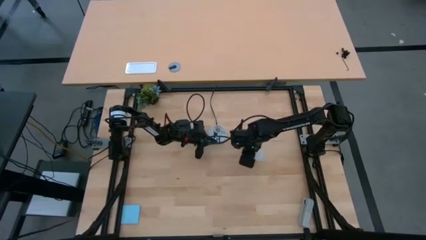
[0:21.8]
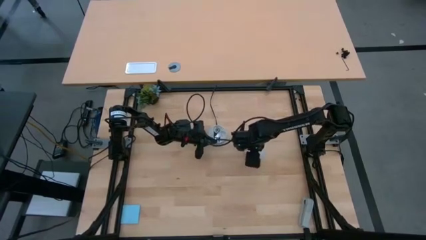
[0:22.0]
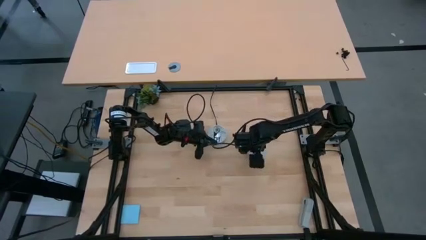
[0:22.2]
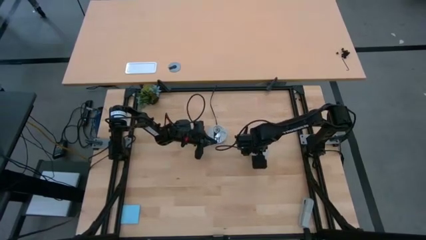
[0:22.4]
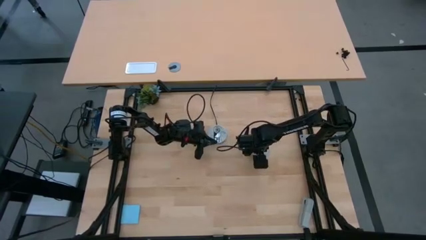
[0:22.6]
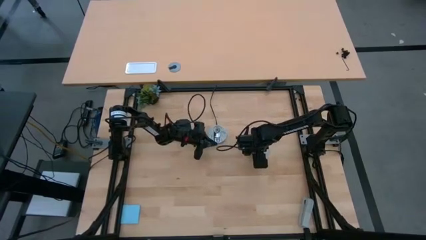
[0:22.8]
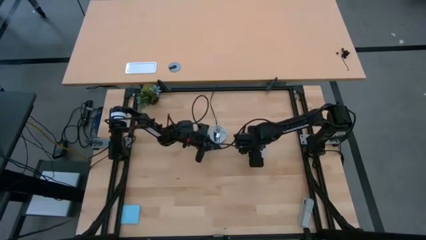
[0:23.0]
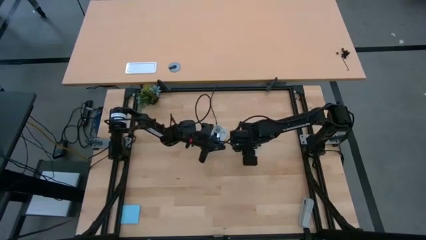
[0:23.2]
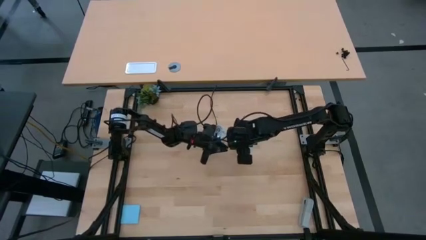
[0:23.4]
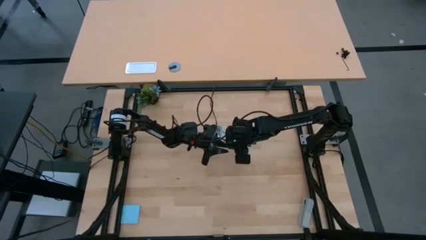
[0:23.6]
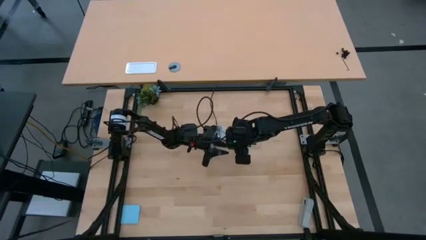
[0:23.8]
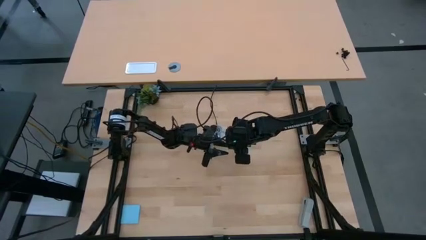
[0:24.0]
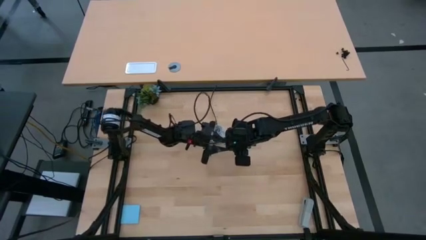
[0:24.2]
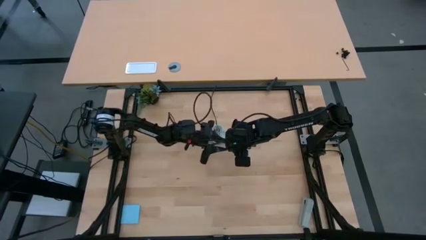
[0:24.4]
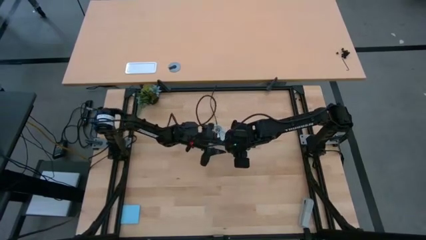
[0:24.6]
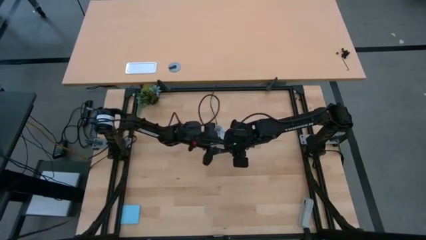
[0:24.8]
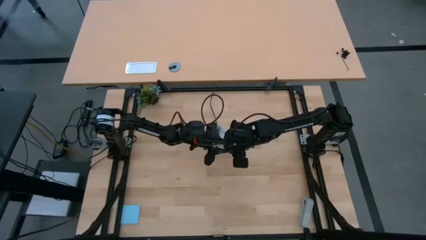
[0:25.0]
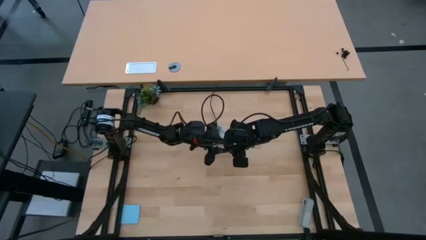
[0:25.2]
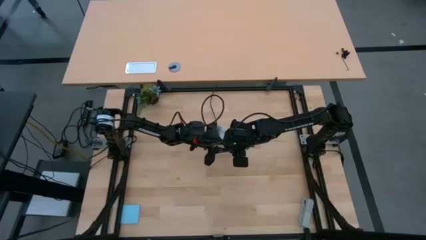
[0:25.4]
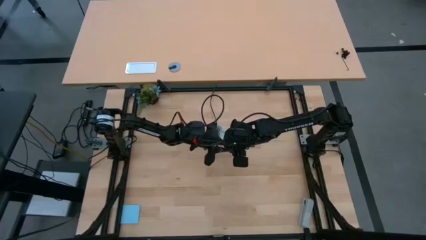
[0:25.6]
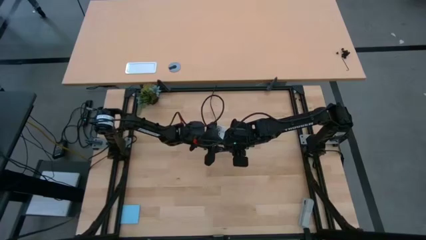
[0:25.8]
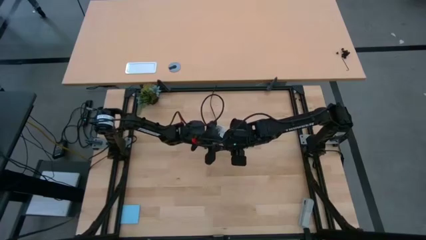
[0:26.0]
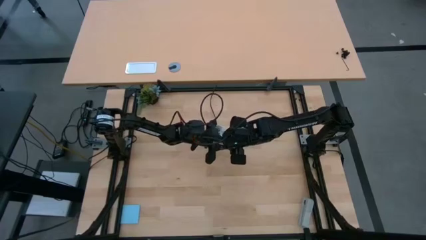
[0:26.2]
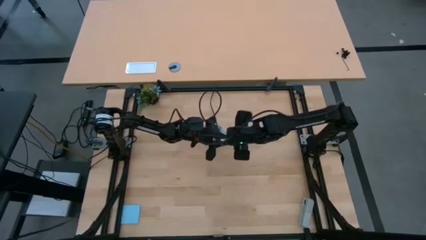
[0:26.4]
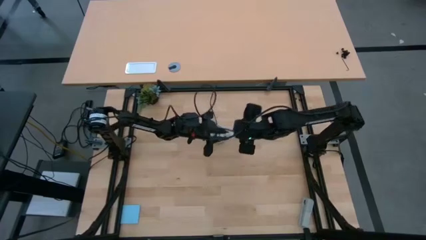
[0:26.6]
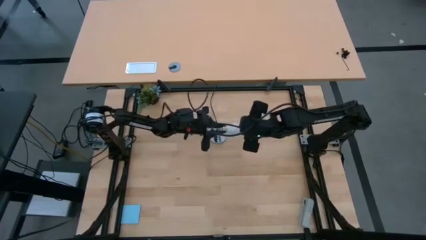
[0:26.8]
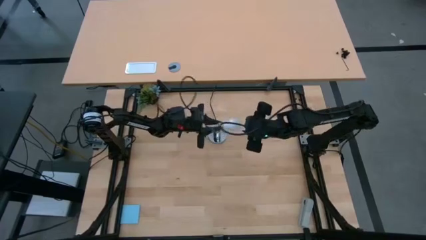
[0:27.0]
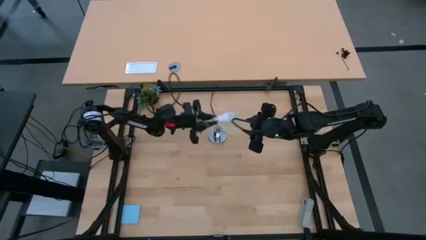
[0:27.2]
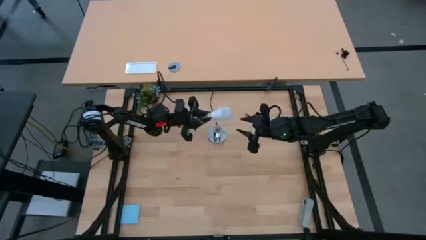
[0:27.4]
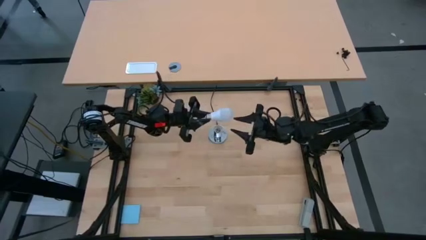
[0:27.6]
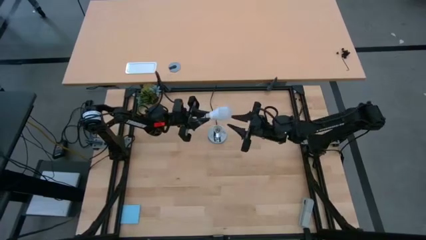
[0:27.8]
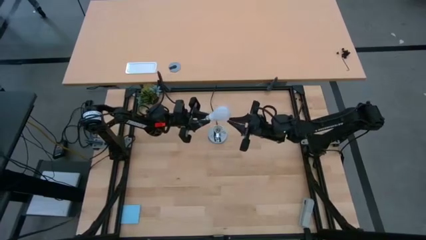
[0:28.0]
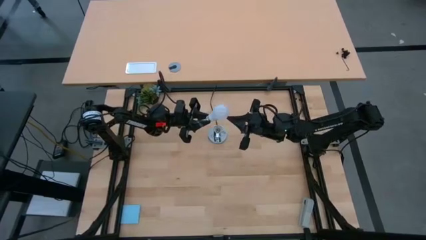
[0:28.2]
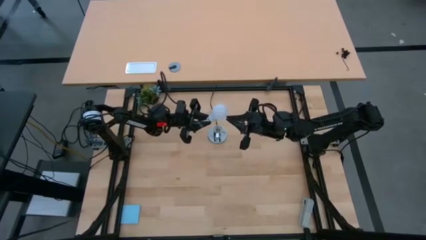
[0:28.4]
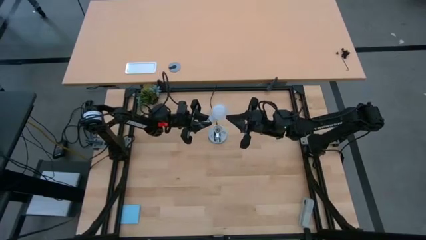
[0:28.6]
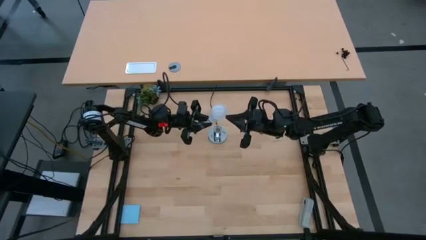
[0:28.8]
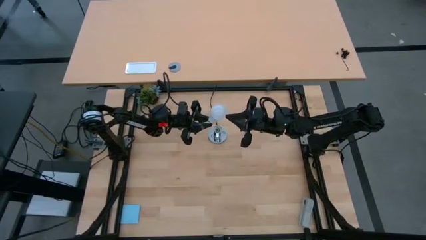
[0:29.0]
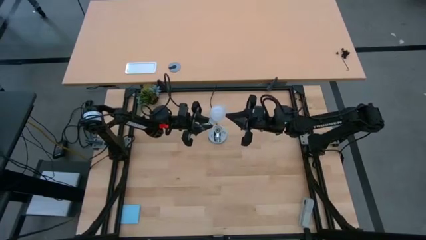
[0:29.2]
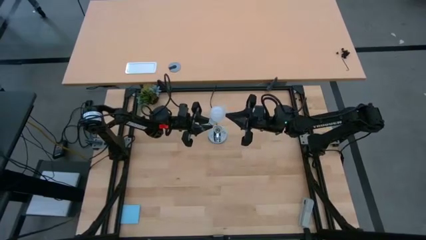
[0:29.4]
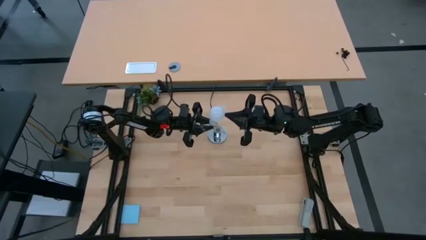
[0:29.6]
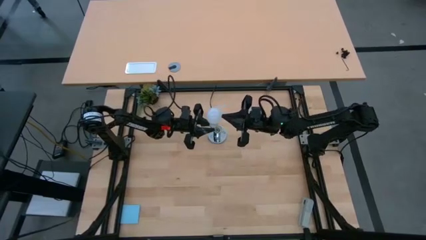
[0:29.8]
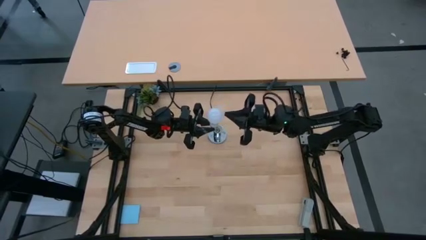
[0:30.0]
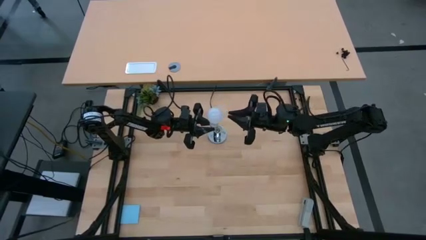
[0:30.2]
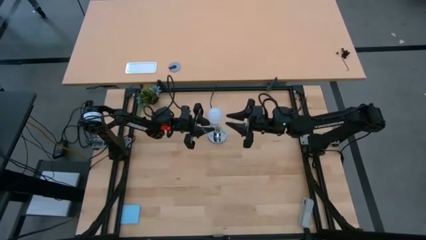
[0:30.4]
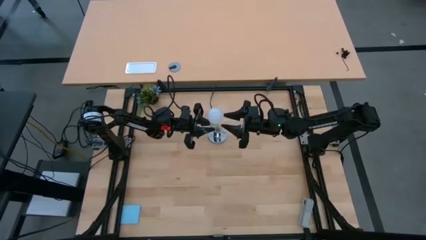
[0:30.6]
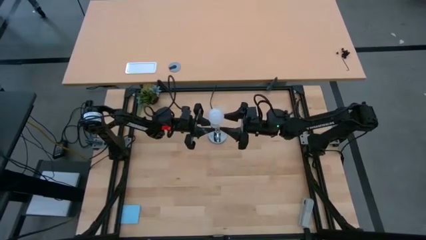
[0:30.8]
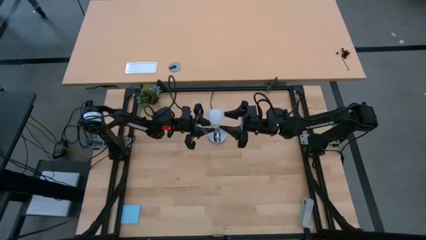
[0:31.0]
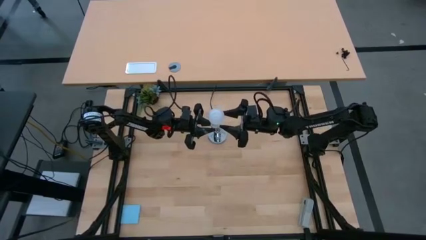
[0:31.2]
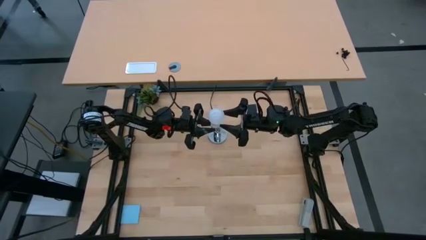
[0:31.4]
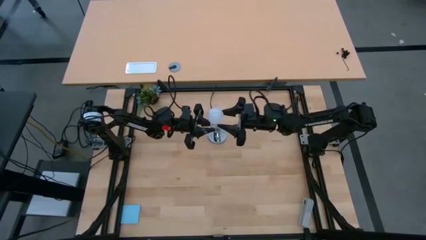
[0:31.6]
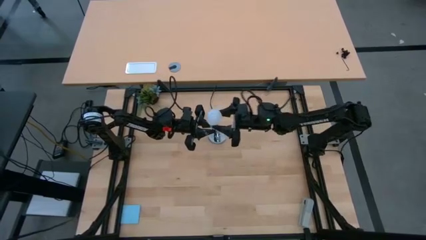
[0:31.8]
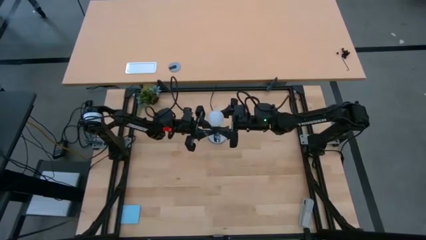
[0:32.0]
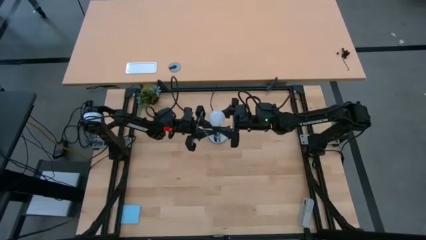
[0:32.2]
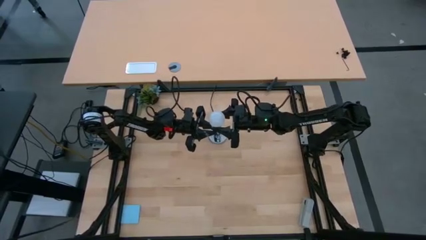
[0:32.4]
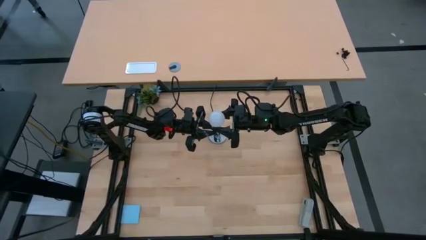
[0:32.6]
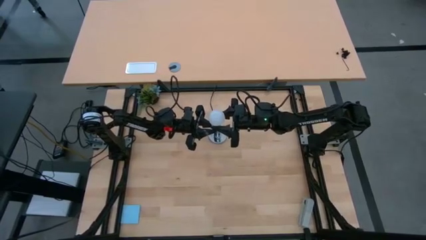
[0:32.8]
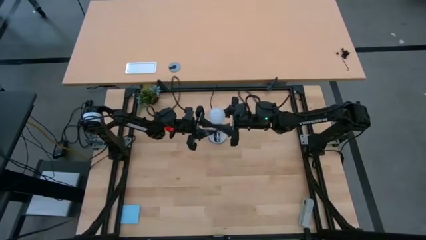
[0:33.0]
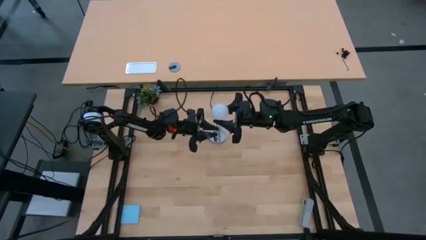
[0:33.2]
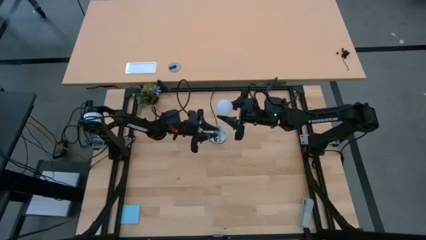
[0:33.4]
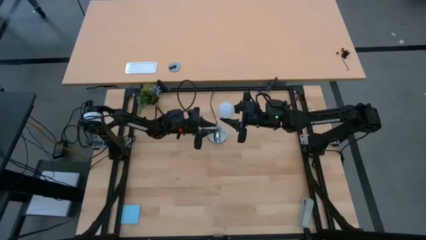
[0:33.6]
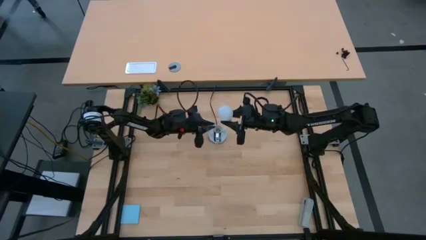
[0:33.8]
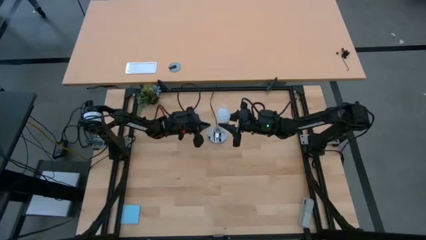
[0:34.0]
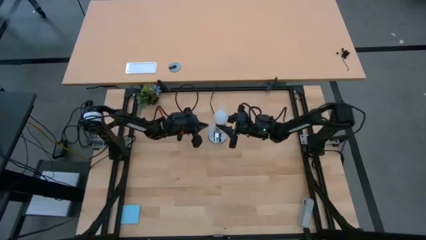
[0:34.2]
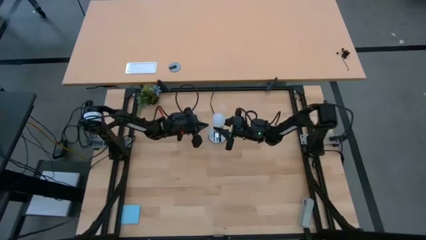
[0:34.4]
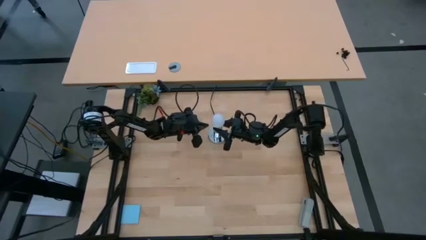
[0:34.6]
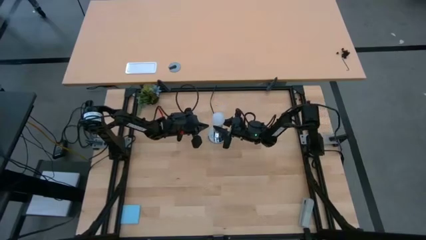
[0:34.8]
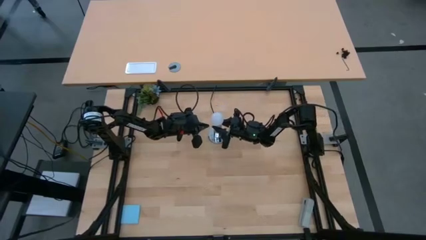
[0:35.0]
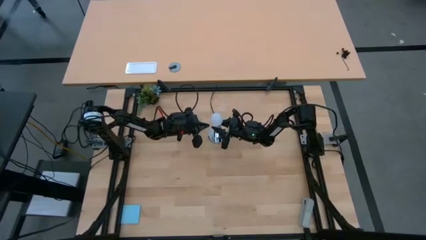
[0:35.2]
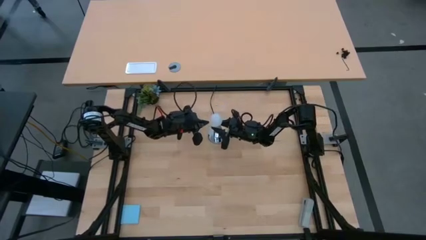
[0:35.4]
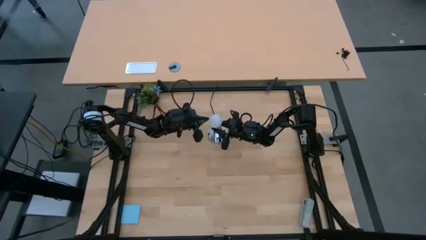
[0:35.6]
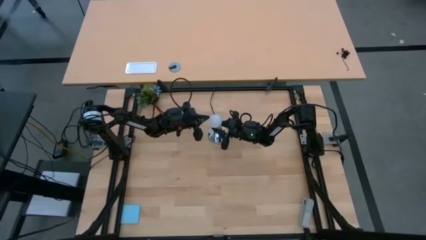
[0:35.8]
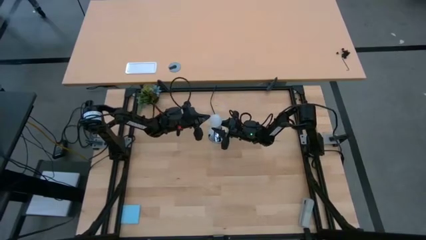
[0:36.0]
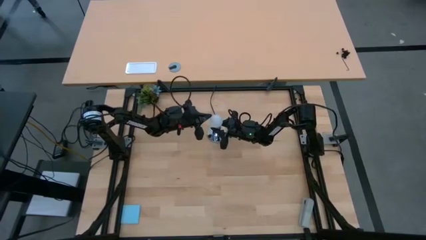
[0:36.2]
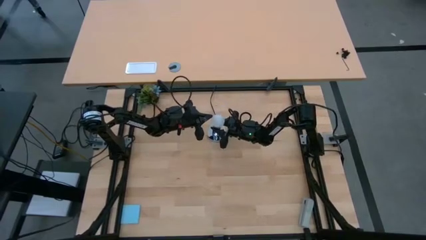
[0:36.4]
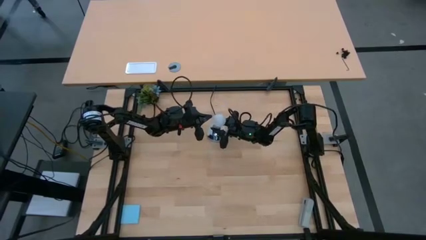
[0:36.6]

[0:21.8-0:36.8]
Task: Screw lightbulb
Insert the white lightbulb into the silver lamp
